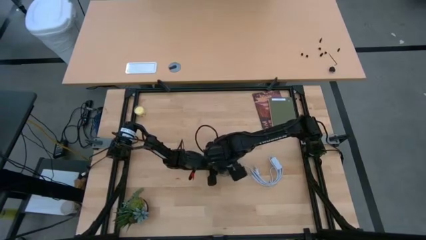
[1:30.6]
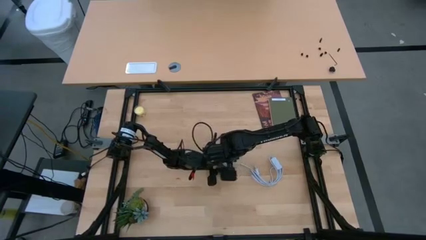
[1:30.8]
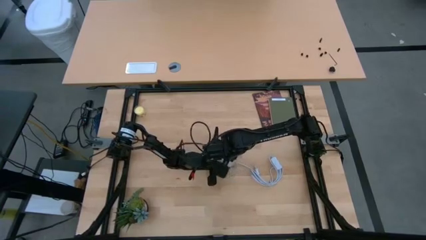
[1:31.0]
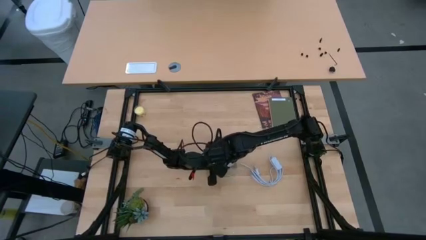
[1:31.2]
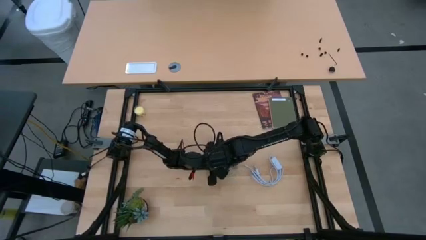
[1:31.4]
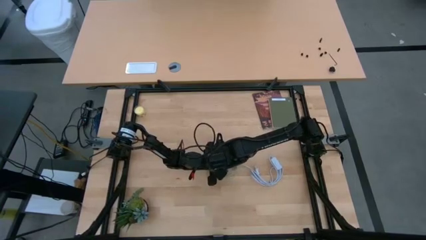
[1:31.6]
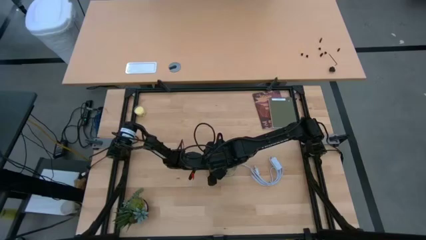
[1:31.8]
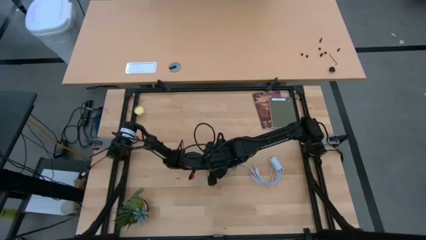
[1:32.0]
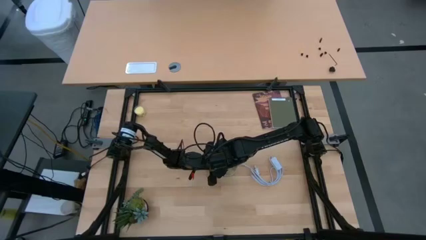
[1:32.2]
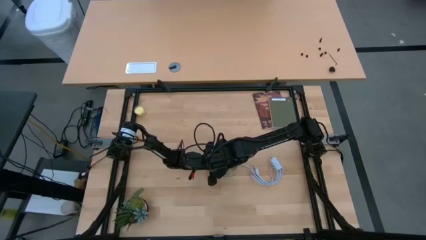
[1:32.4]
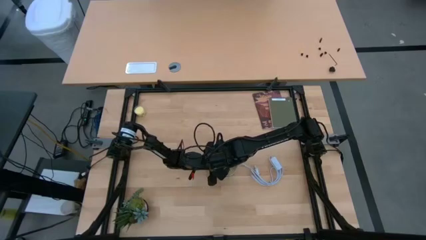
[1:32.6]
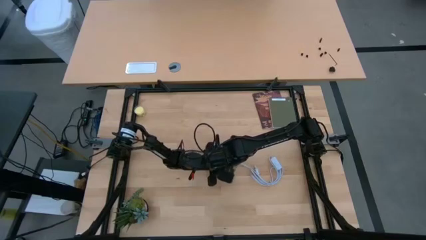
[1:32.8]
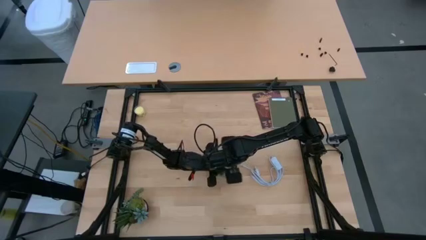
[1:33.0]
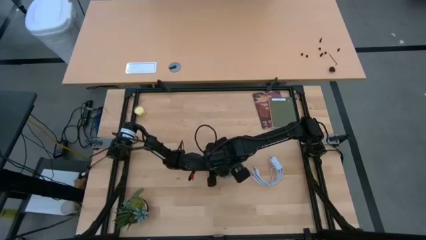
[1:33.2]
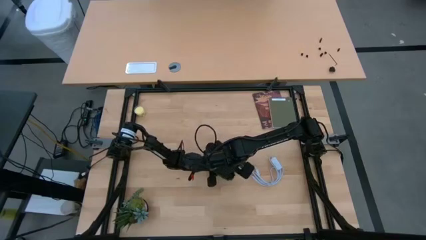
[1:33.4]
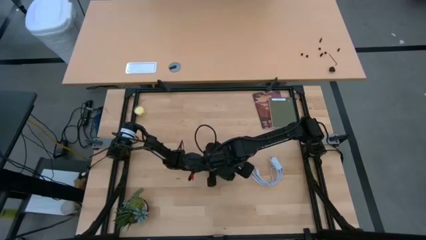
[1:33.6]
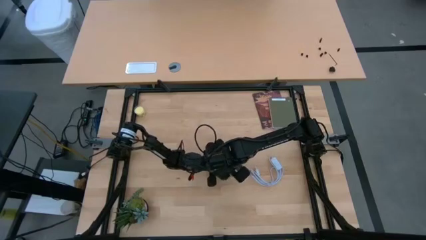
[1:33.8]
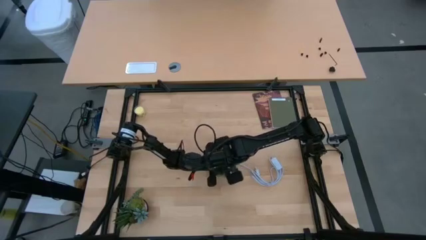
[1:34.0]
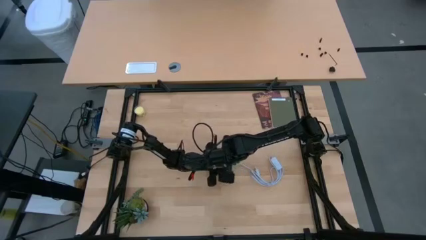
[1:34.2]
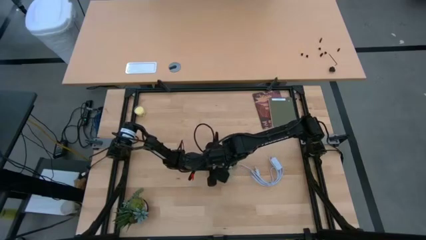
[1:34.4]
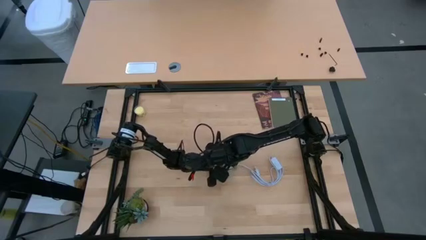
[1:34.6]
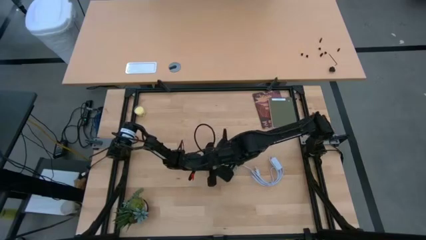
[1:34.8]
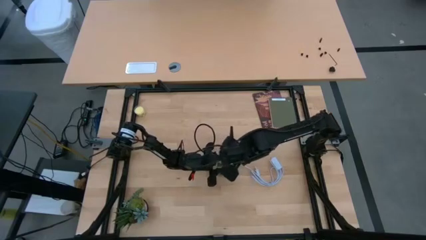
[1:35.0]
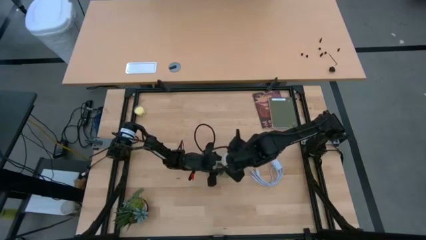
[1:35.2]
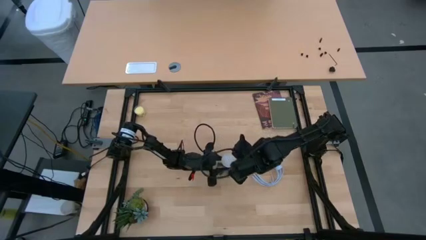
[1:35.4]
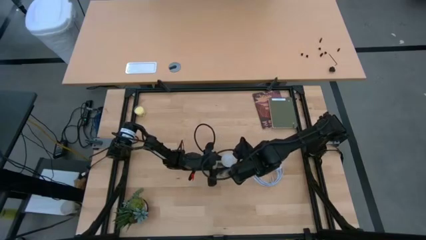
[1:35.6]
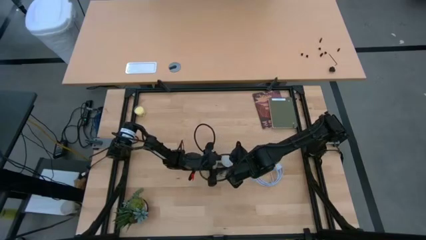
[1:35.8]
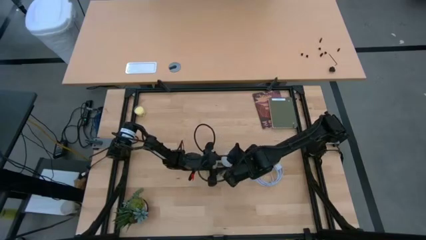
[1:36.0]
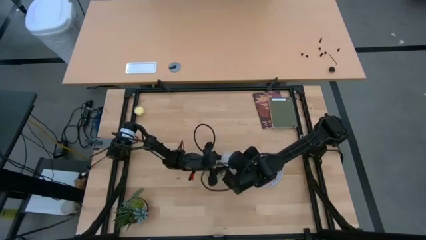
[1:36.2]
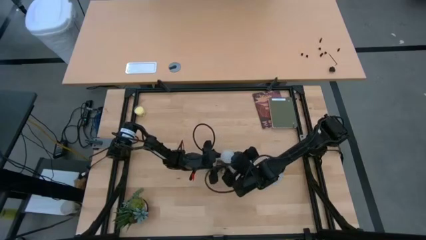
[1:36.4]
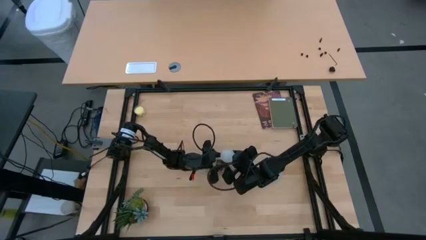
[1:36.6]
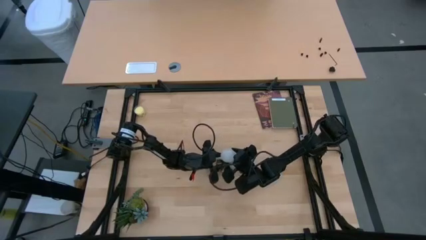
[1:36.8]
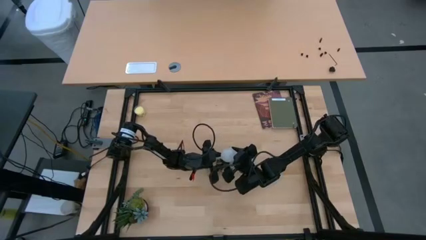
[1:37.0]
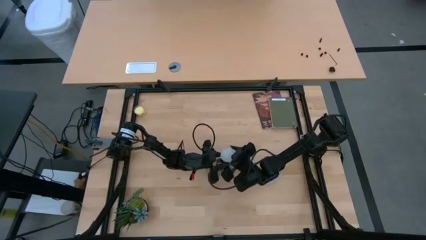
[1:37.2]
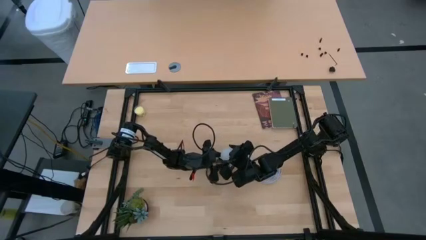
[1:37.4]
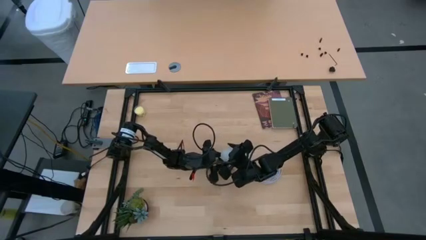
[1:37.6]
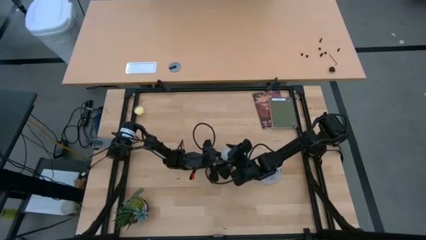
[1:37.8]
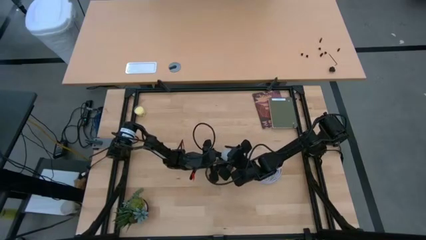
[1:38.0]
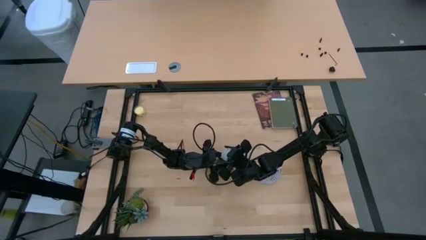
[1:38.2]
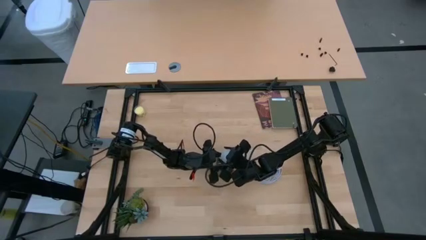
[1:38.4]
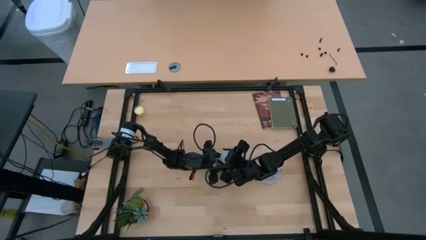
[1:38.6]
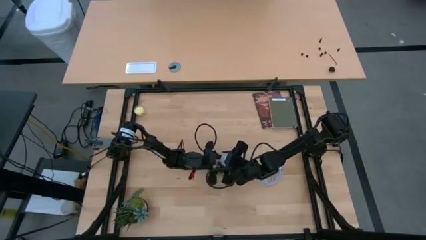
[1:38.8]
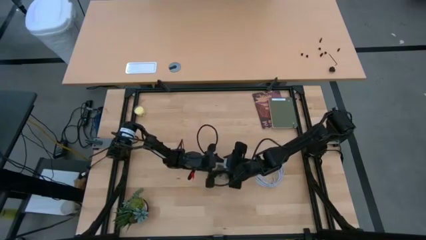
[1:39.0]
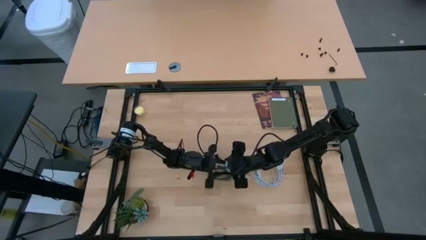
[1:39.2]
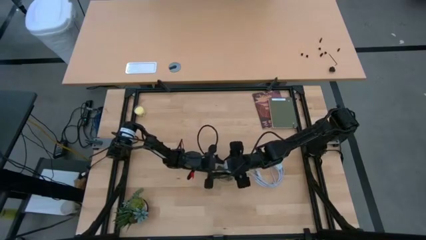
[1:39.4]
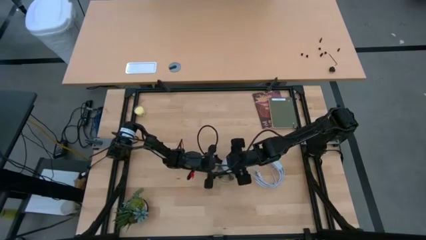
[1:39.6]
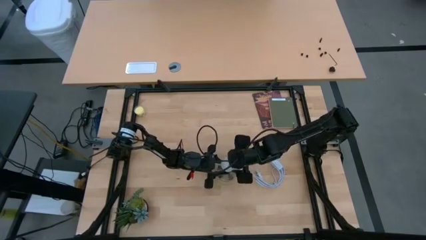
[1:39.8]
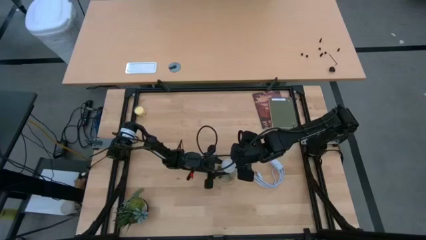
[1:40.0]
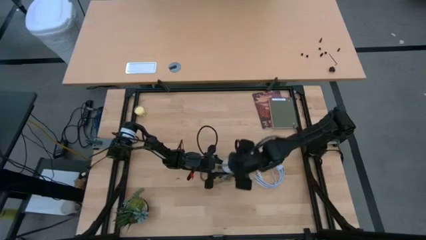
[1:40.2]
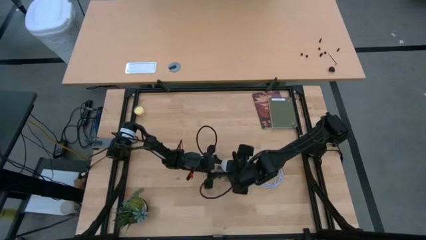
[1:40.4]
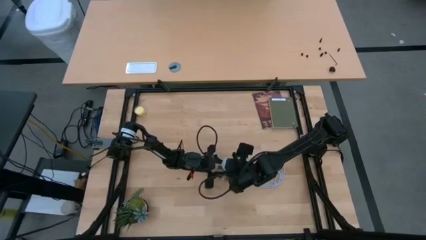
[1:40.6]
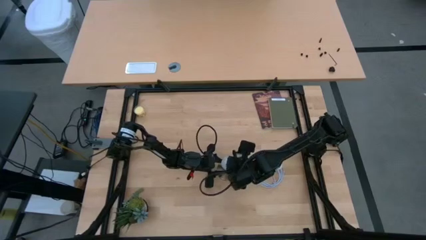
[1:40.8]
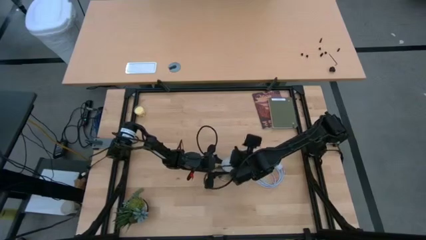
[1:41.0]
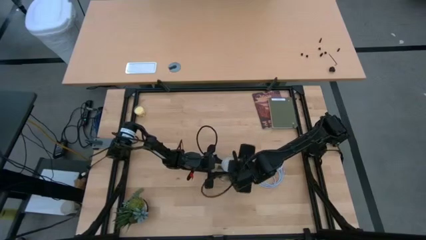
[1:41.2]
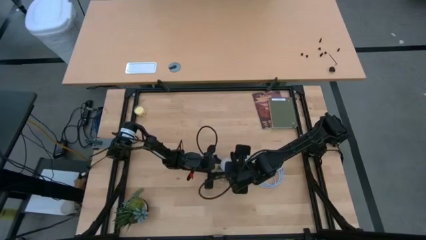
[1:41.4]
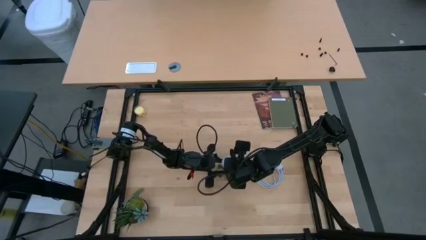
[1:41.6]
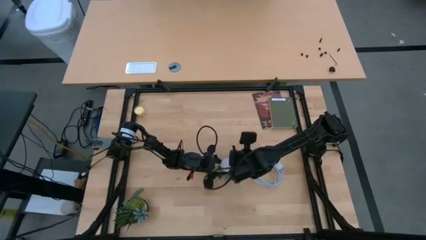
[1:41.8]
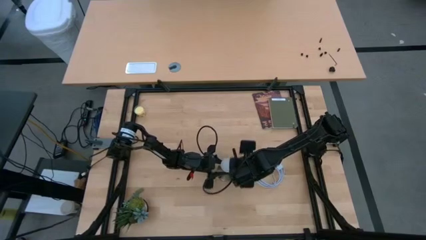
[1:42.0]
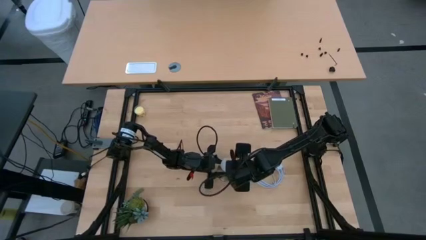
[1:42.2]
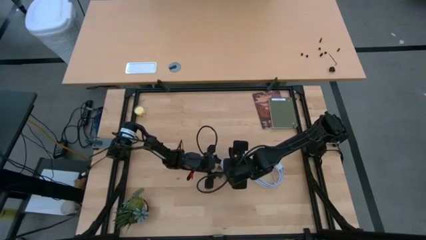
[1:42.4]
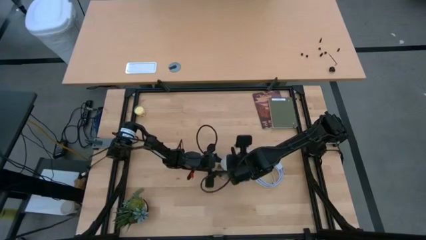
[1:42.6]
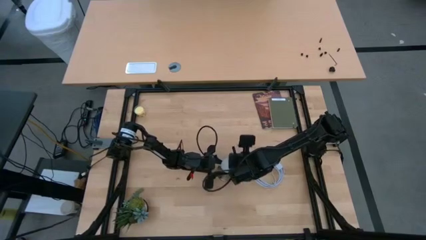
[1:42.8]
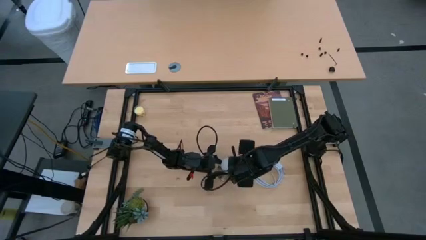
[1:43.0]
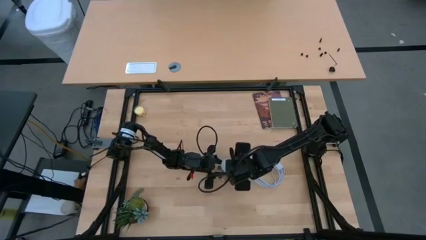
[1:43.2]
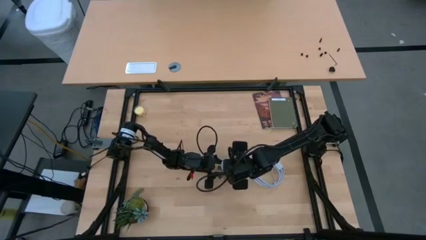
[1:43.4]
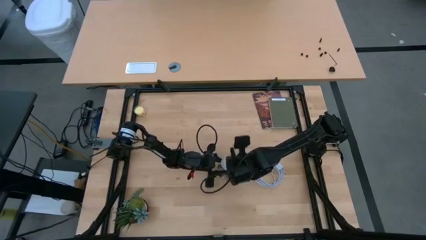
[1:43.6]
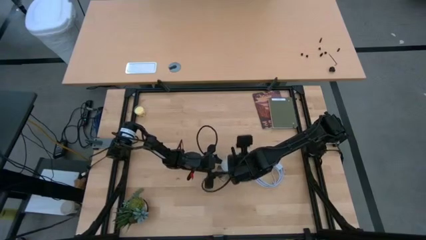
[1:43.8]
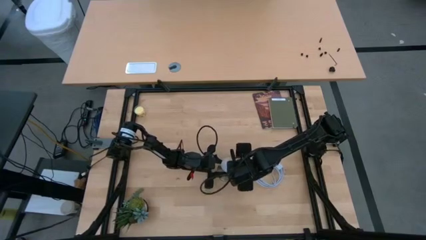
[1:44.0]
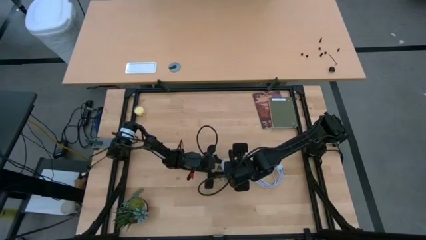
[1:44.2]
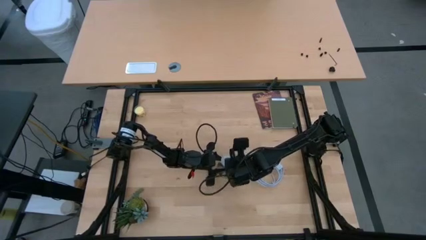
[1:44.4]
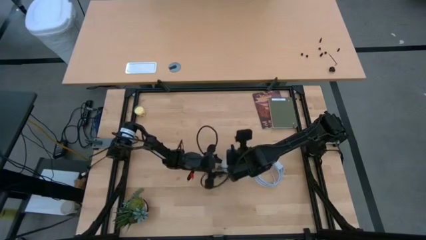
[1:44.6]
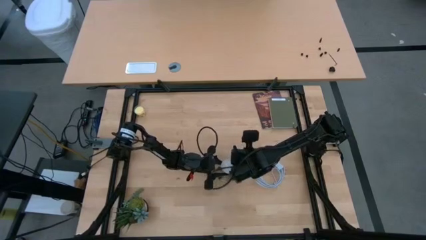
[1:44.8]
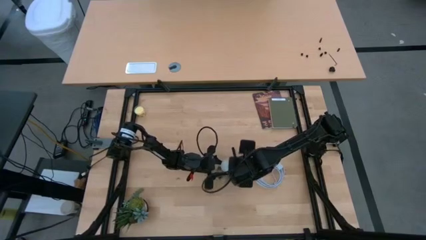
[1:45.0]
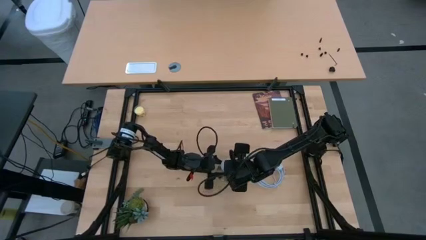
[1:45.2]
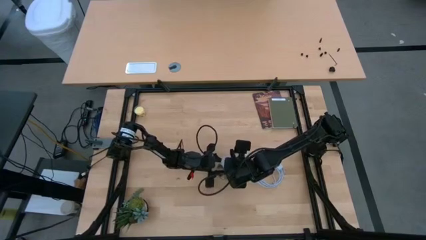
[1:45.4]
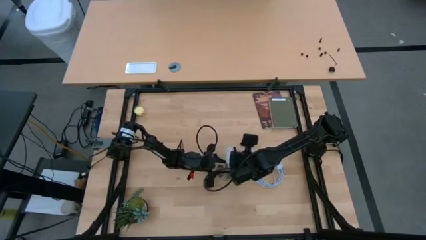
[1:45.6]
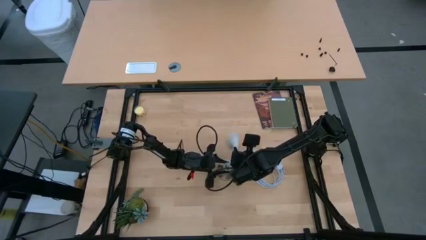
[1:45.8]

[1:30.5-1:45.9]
Task: Screw lightbulb
Remove the light bulb from the lamp
